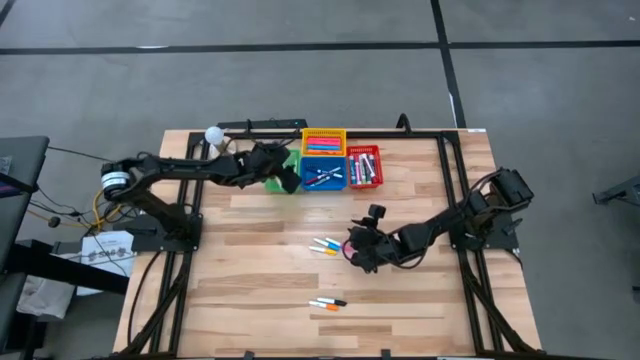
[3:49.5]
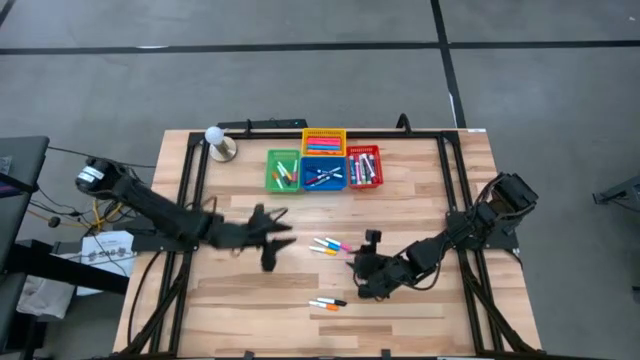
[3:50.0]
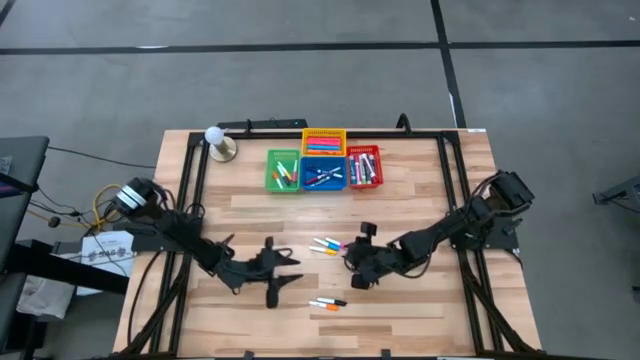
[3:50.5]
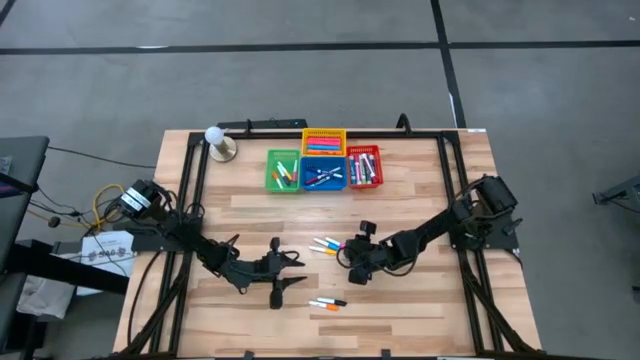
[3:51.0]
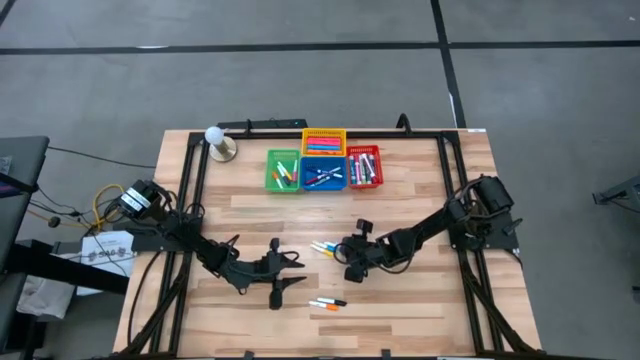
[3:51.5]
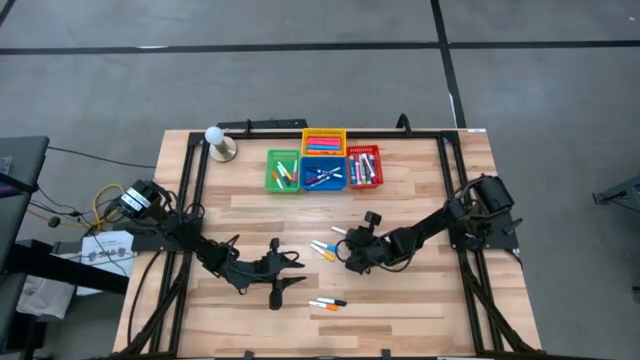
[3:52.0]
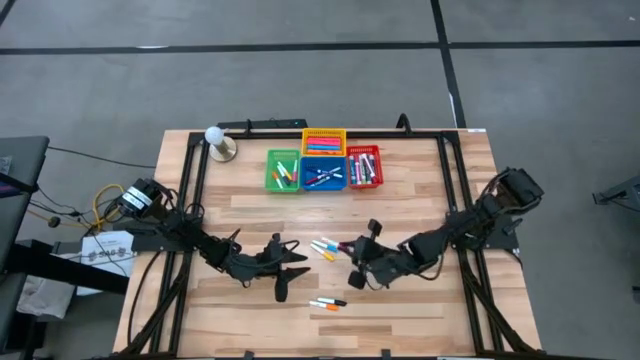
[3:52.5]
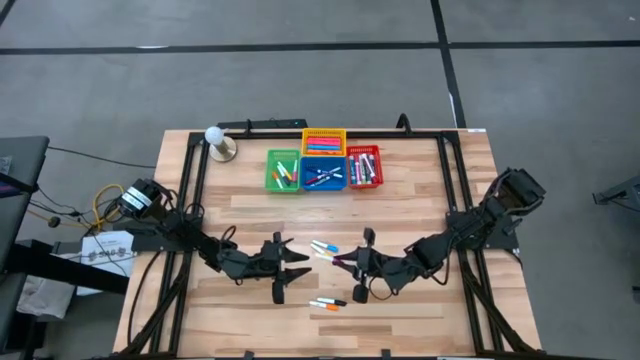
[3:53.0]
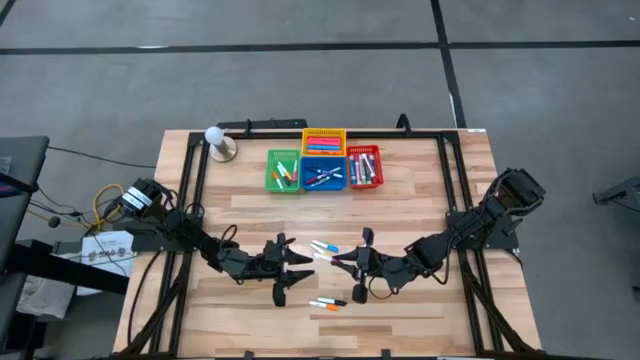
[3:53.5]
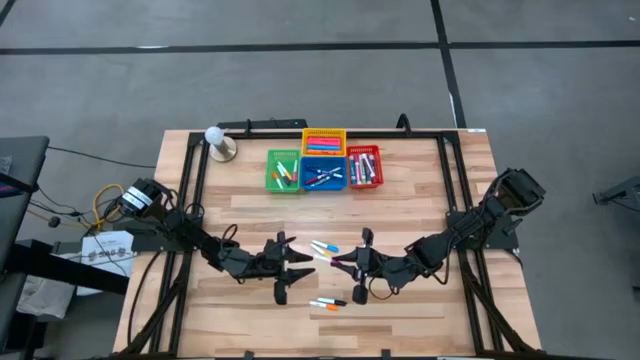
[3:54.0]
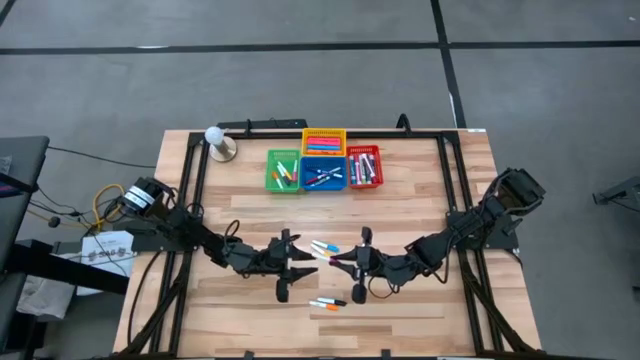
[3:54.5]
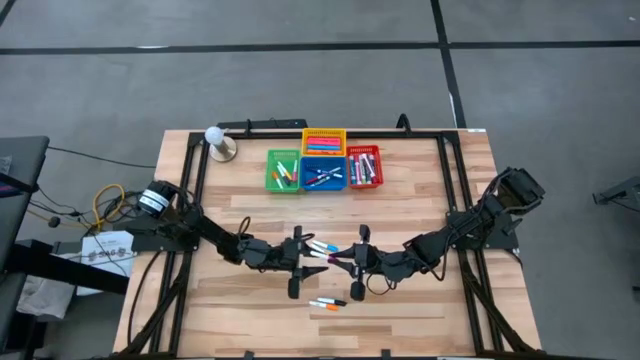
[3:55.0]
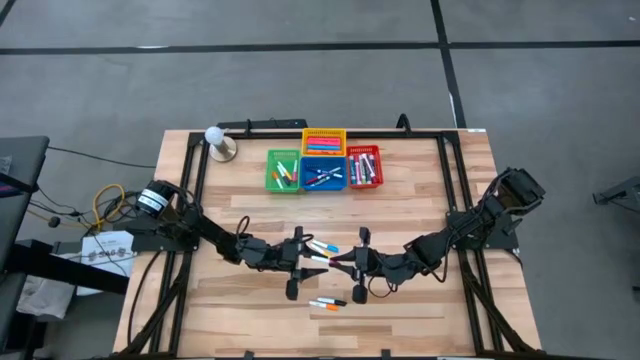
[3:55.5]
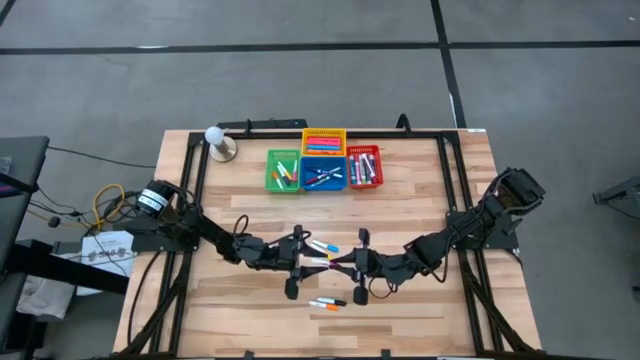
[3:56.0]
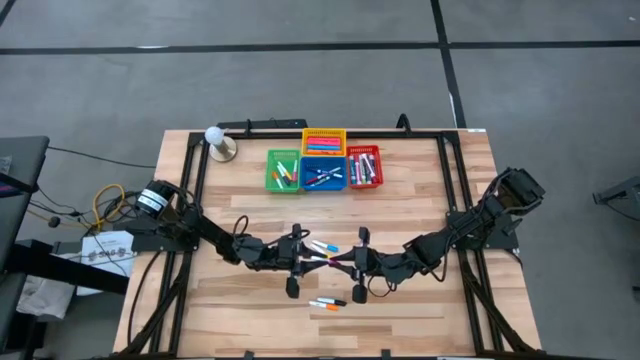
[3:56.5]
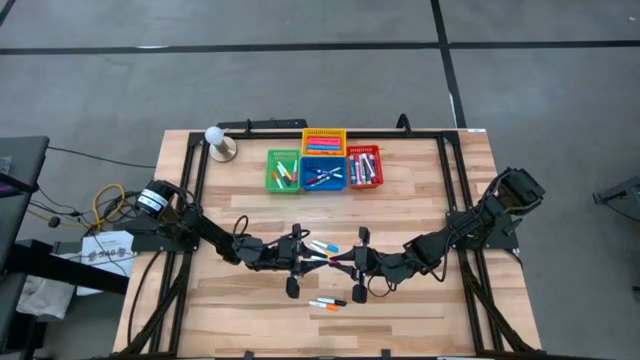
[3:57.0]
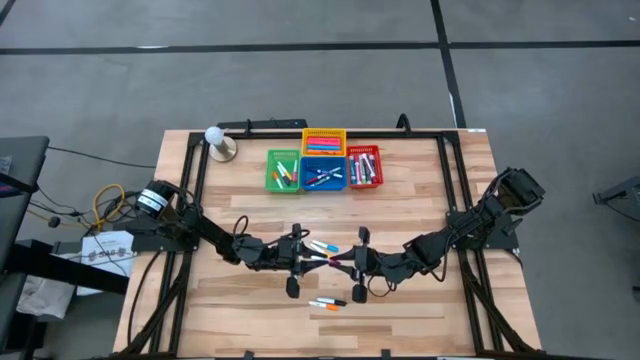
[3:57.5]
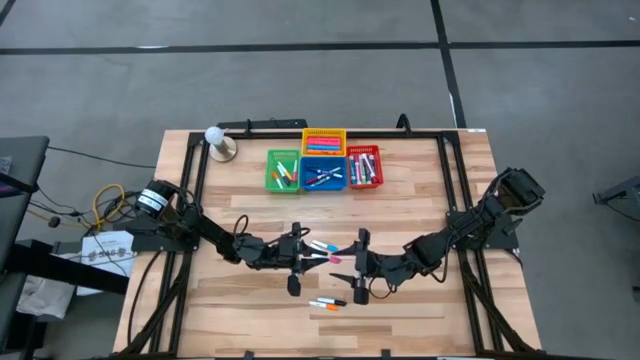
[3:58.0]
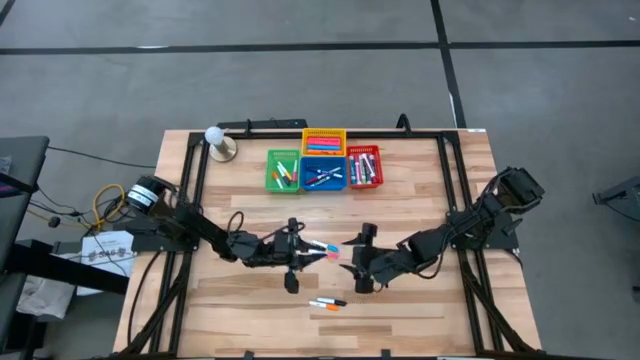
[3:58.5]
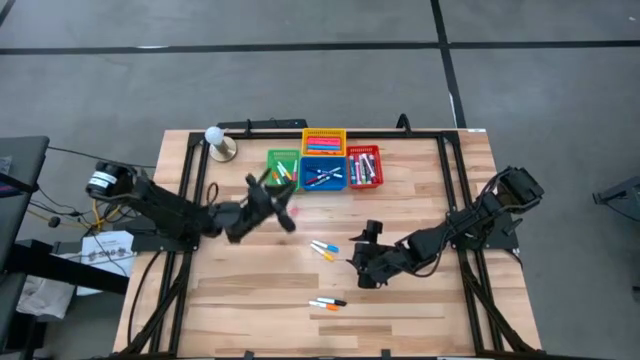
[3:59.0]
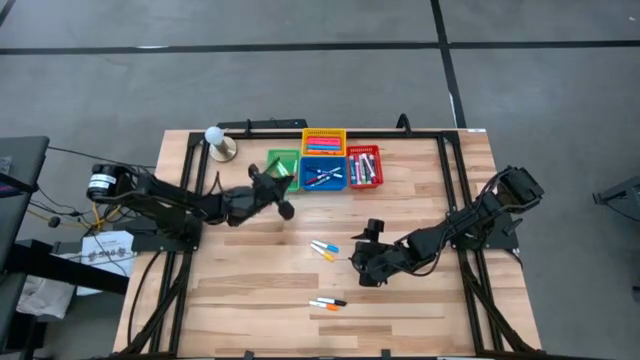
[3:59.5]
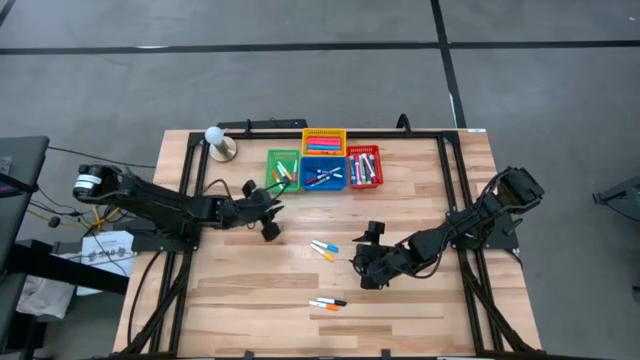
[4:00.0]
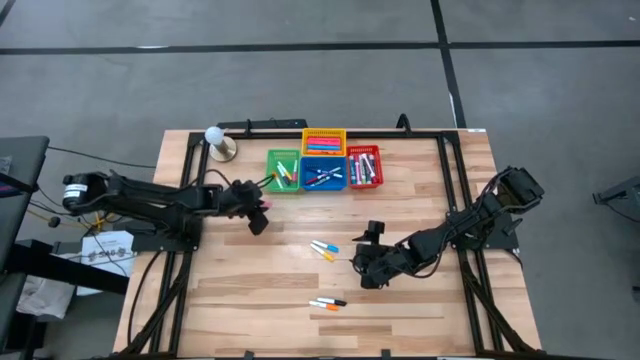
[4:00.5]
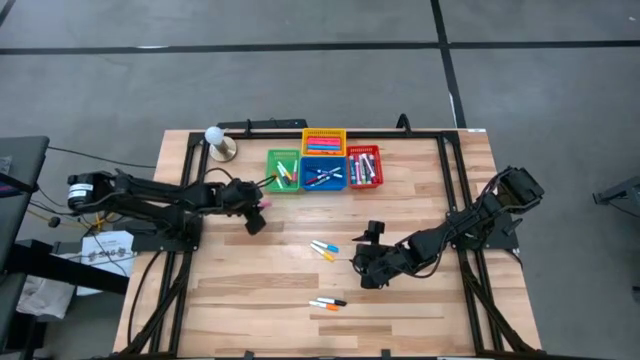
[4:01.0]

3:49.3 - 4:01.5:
Task: Pick & Place Markers
Put the small pink highlighter pen into the green bin

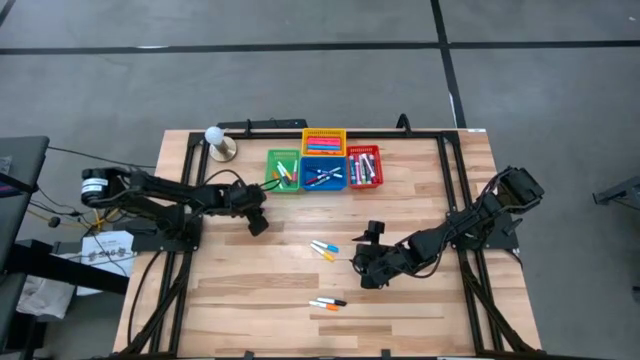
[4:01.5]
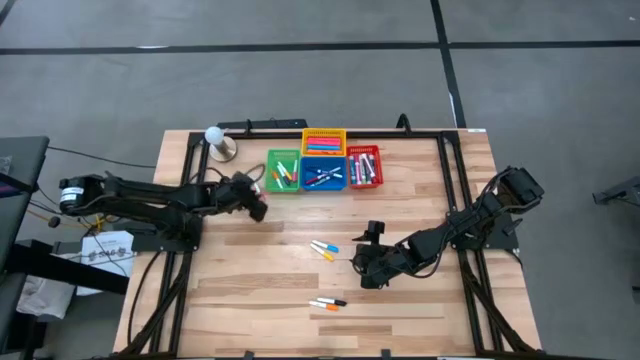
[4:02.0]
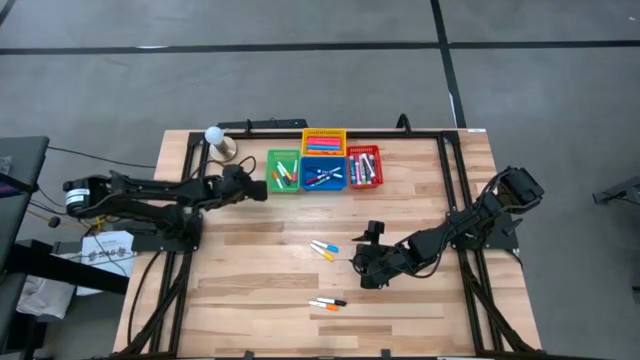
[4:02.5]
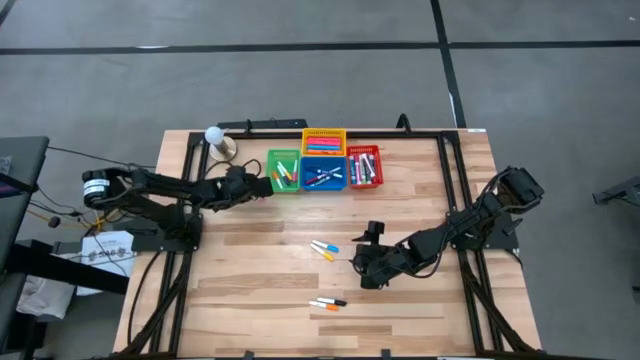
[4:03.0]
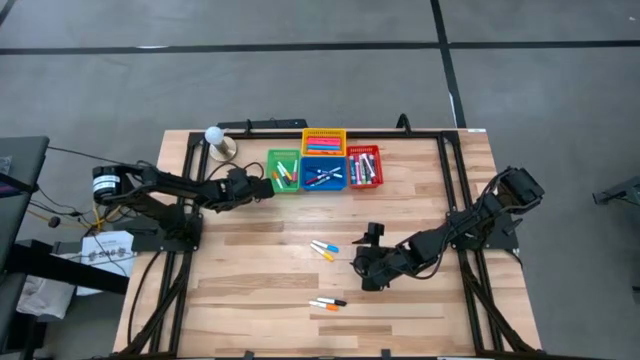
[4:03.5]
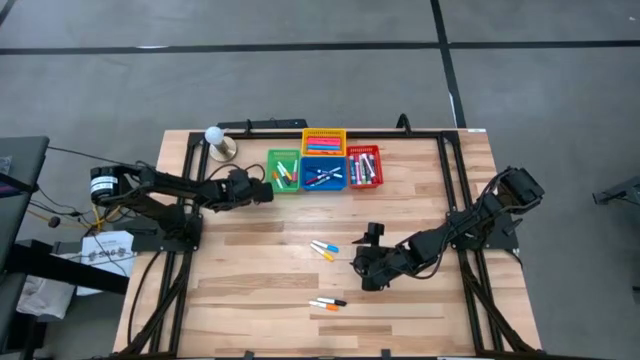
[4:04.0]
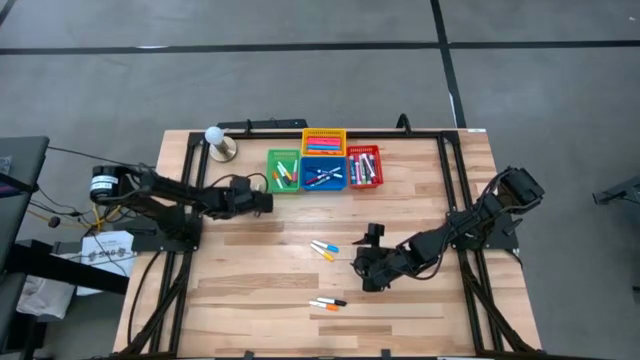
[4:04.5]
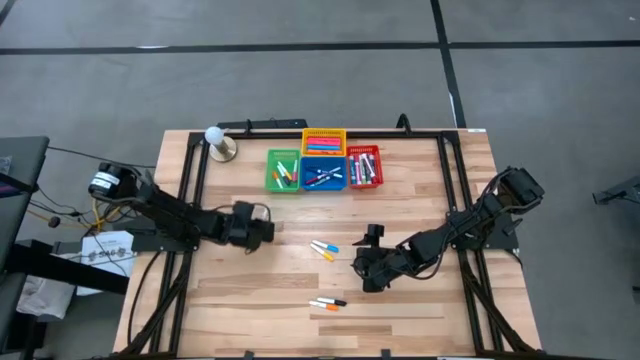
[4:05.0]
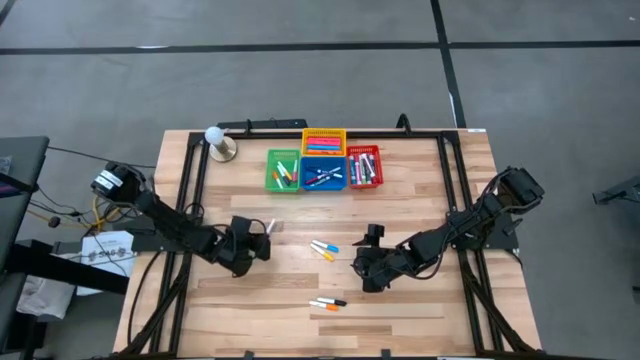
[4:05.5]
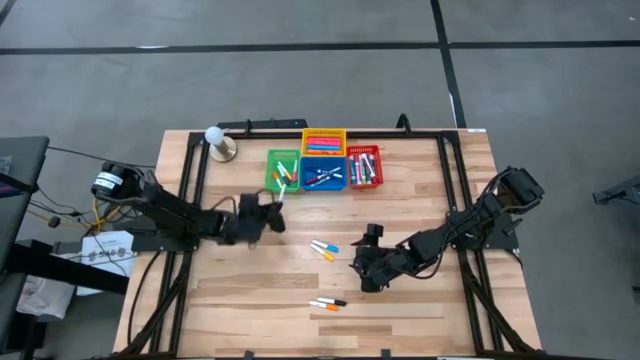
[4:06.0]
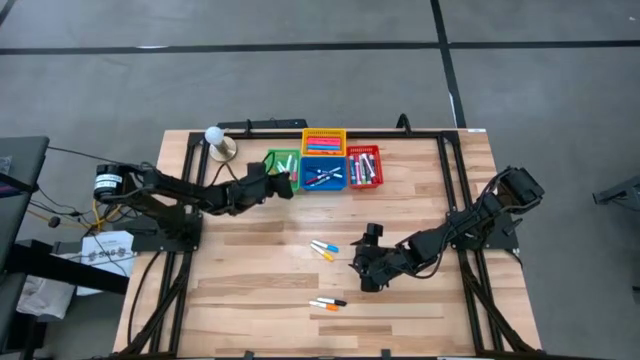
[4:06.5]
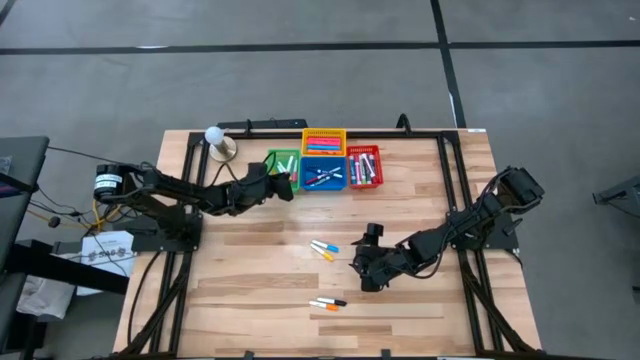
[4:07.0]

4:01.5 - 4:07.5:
Put the small pink highlighter pen into the green bin

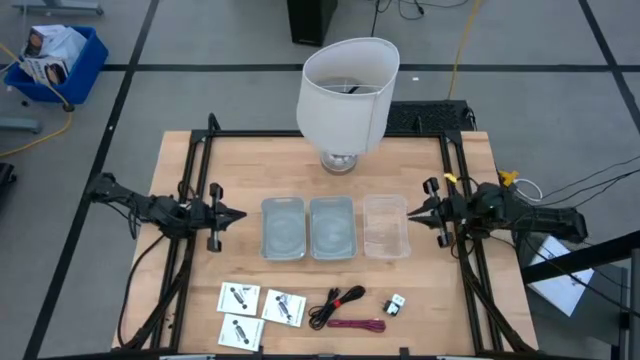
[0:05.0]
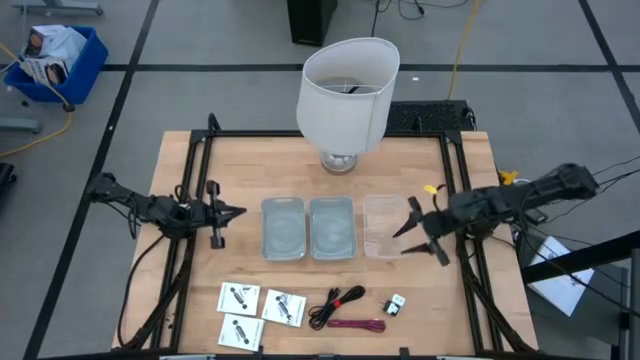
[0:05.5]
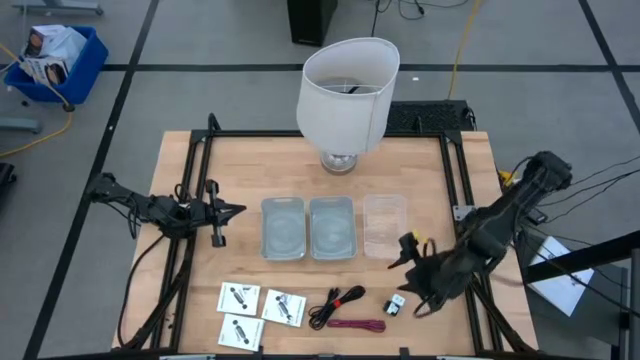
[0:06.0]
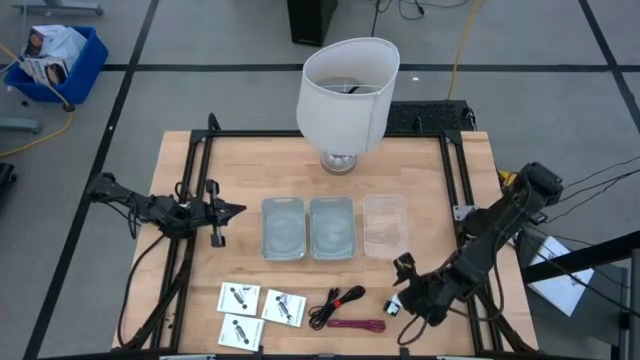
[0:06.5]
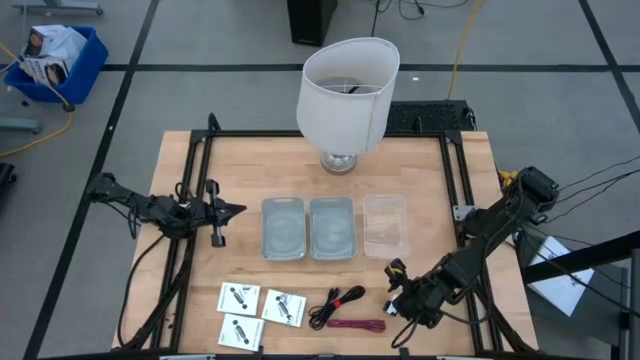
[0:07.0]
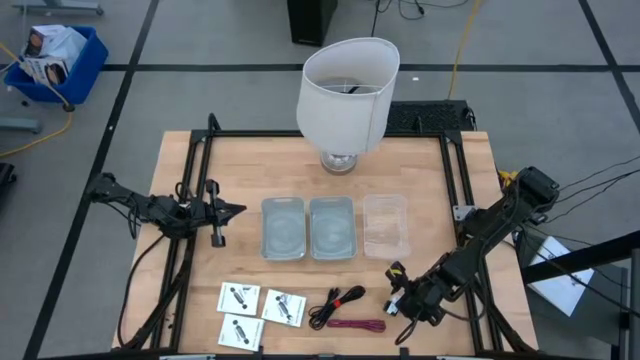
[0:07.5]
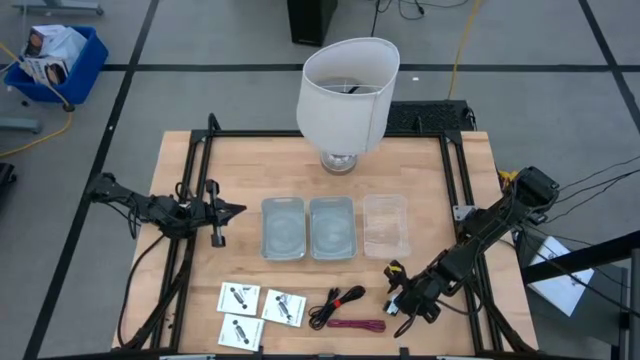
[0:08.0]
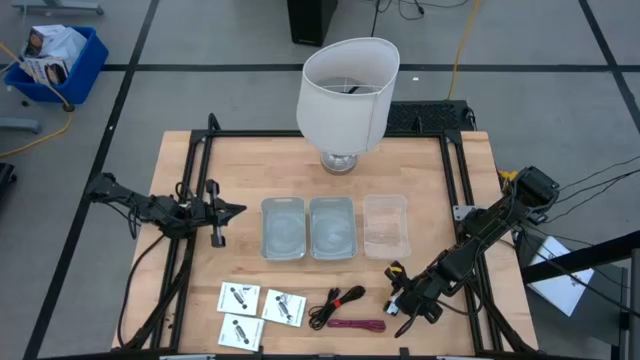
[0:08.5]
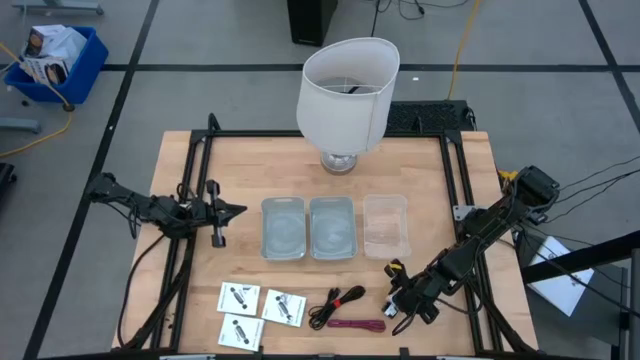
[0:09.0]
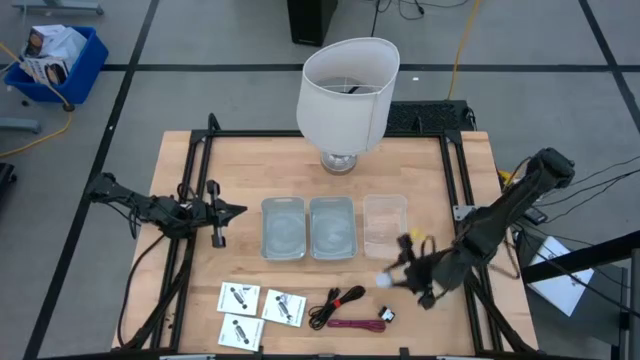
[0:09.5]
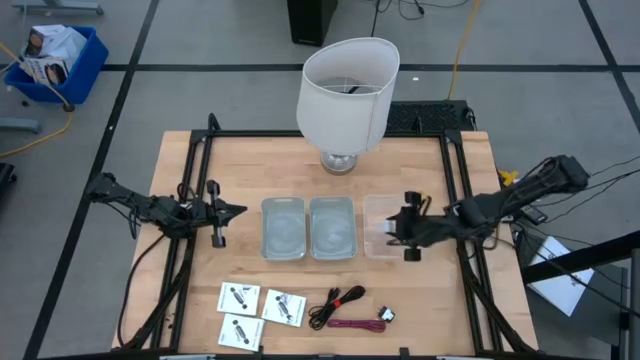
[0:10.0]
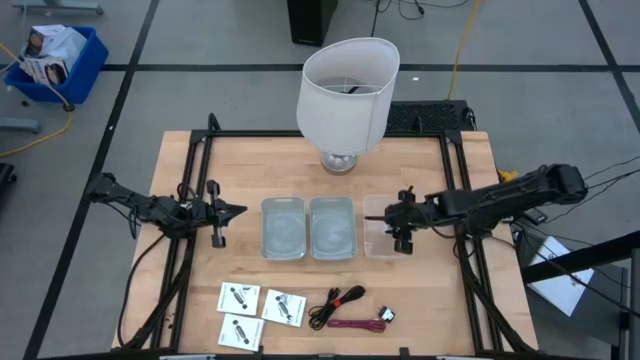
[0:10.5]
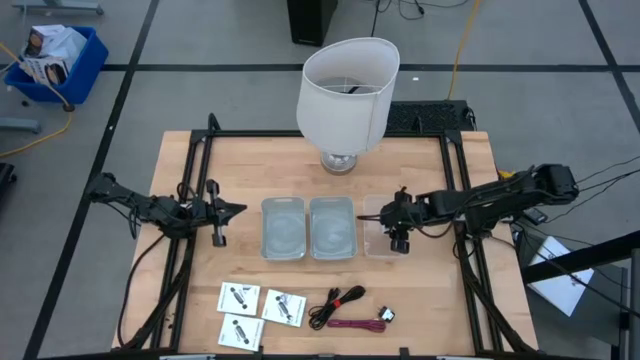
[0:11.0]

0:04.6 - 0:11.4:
Task: Pick and place items into bin
Put the white charger adapter into the transparent bin
